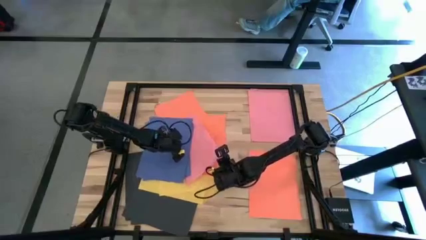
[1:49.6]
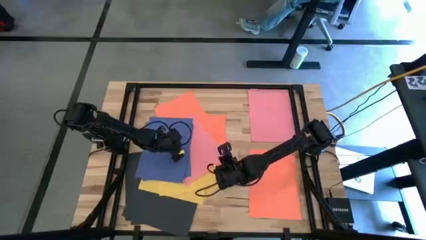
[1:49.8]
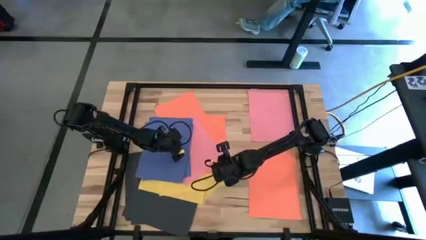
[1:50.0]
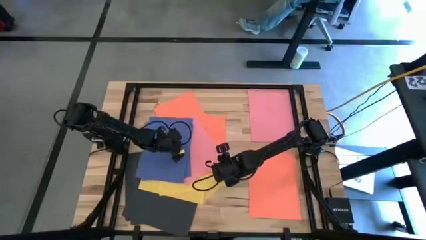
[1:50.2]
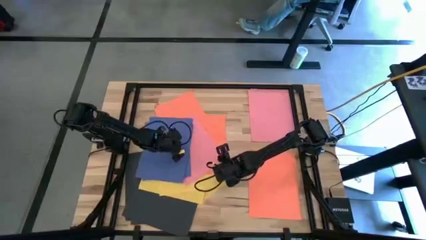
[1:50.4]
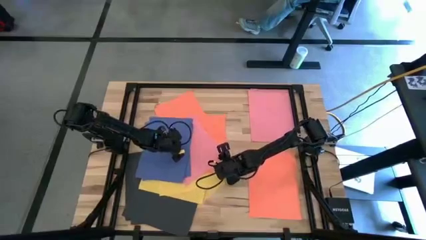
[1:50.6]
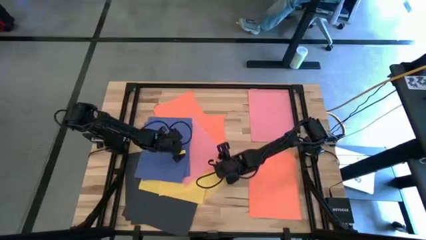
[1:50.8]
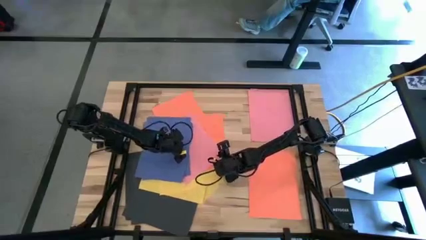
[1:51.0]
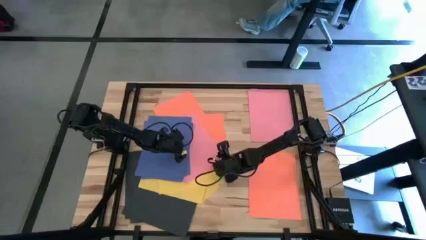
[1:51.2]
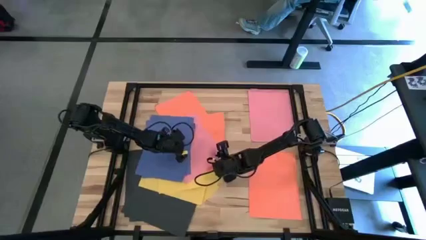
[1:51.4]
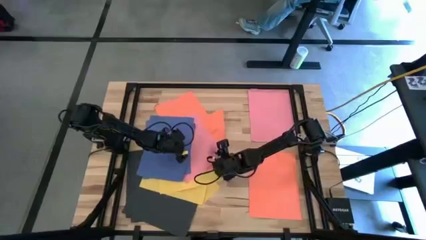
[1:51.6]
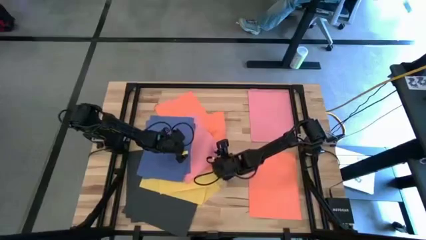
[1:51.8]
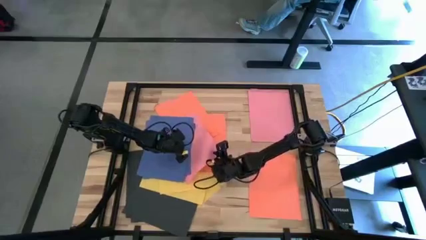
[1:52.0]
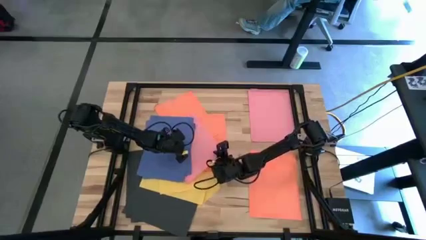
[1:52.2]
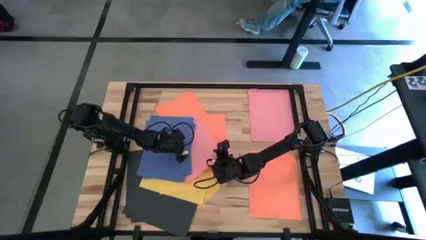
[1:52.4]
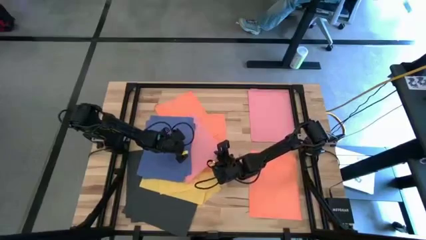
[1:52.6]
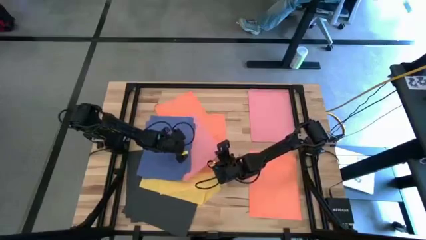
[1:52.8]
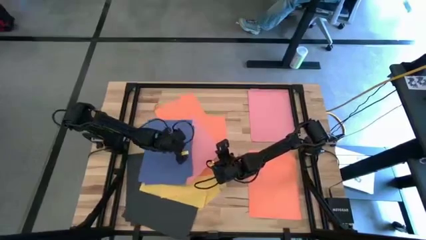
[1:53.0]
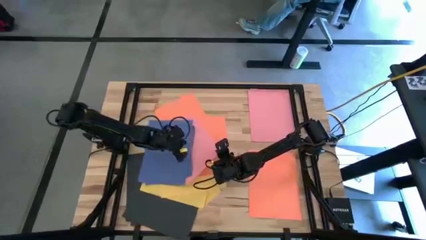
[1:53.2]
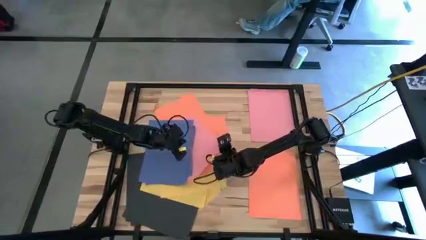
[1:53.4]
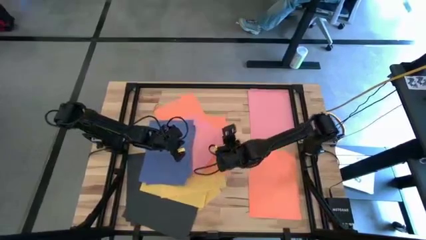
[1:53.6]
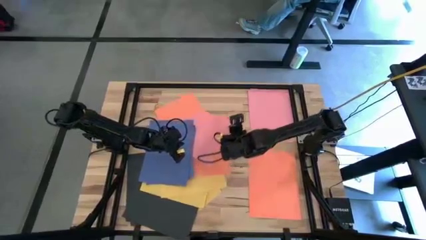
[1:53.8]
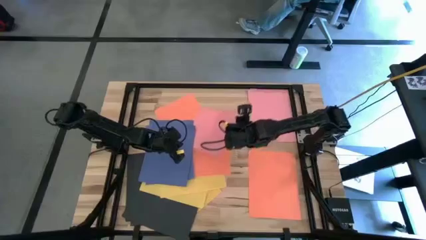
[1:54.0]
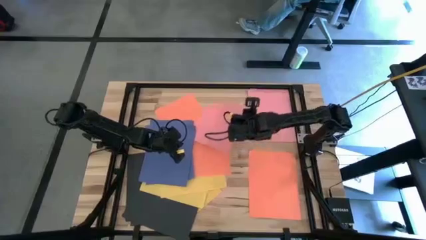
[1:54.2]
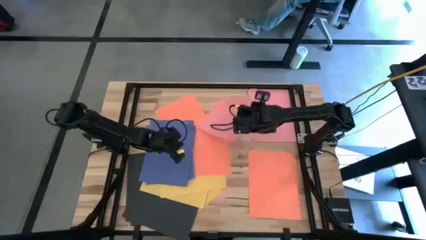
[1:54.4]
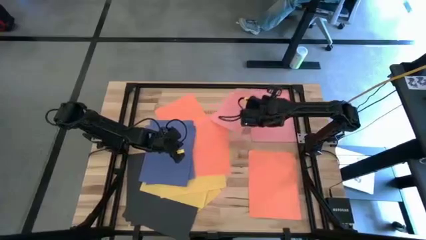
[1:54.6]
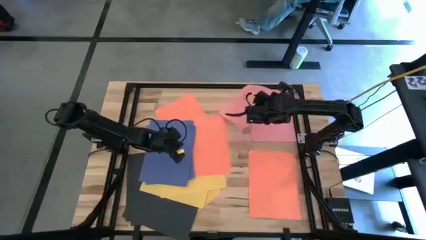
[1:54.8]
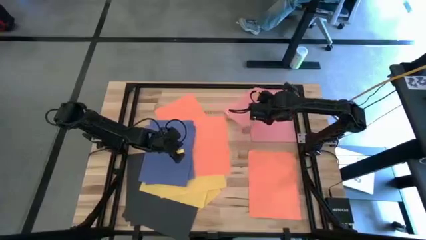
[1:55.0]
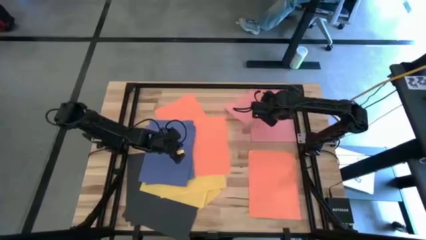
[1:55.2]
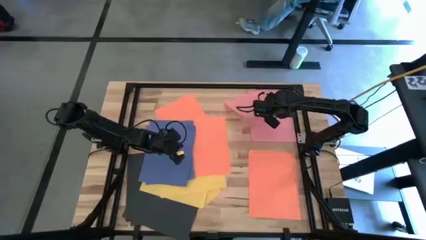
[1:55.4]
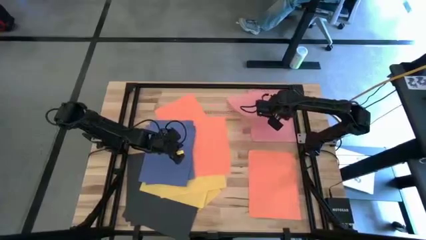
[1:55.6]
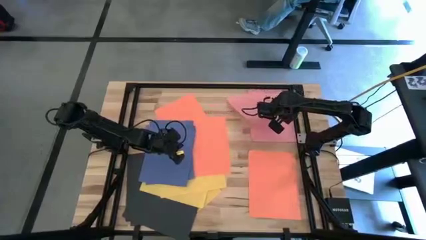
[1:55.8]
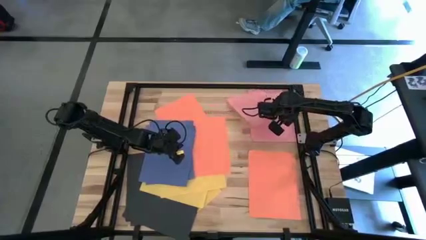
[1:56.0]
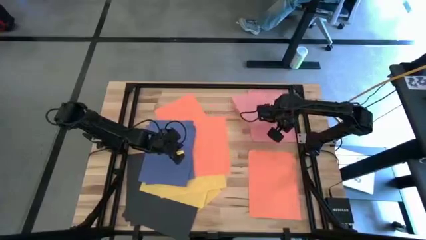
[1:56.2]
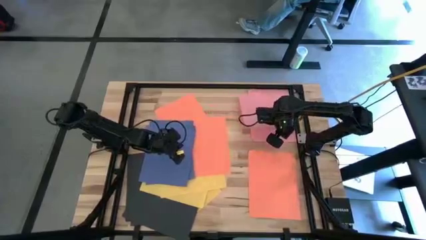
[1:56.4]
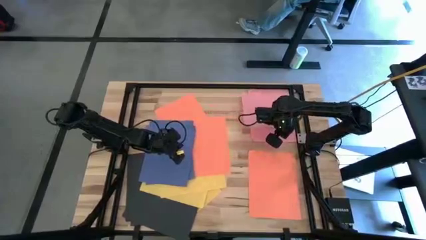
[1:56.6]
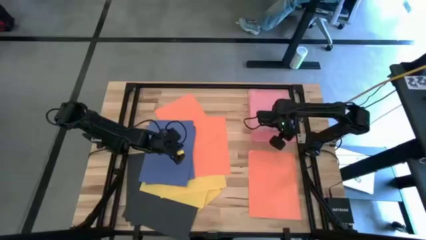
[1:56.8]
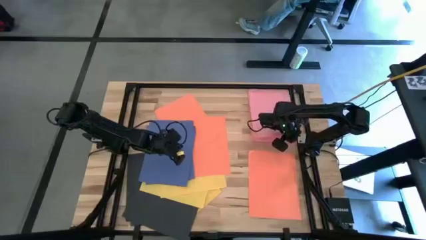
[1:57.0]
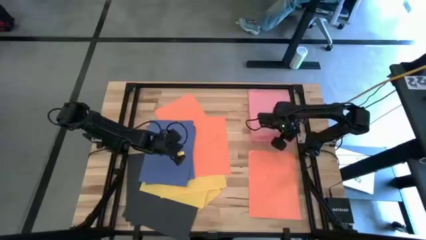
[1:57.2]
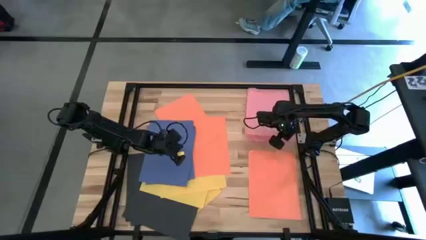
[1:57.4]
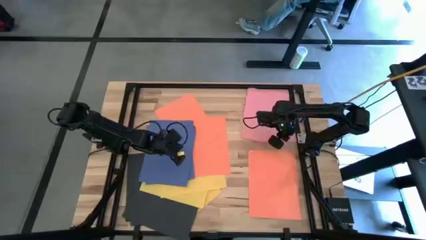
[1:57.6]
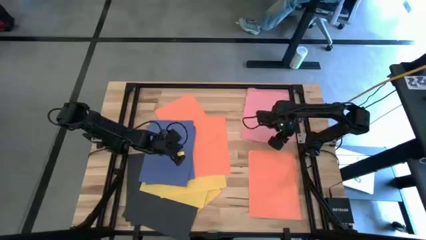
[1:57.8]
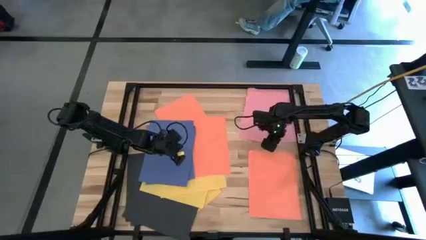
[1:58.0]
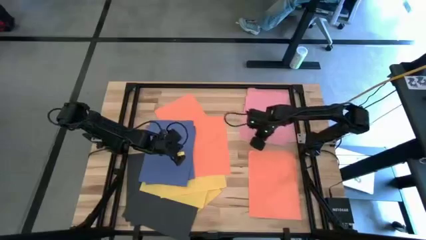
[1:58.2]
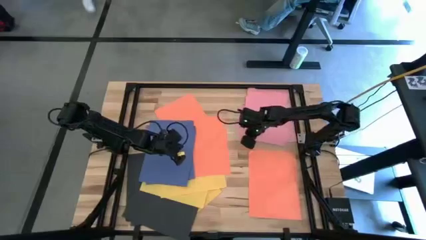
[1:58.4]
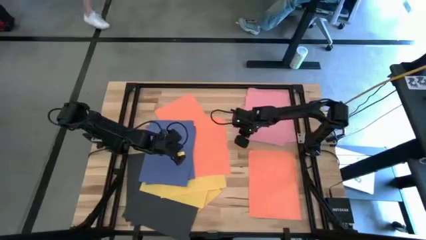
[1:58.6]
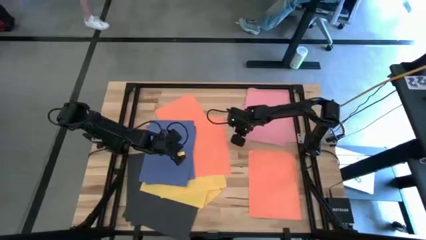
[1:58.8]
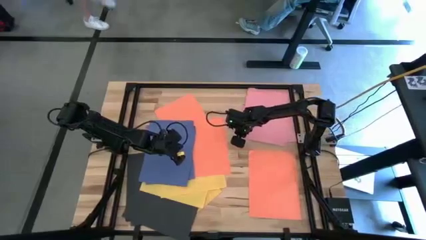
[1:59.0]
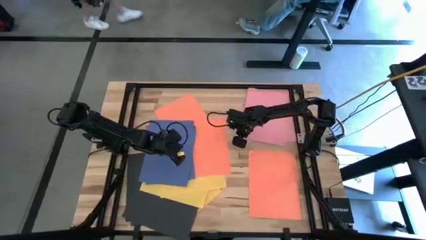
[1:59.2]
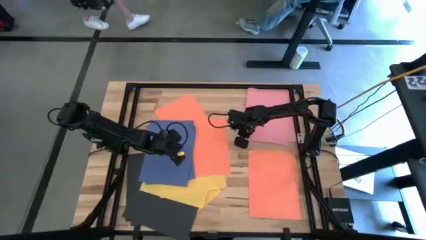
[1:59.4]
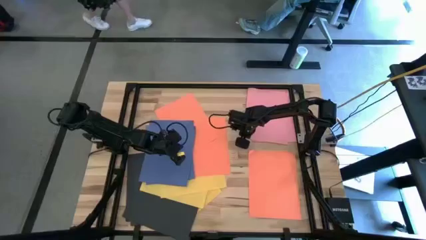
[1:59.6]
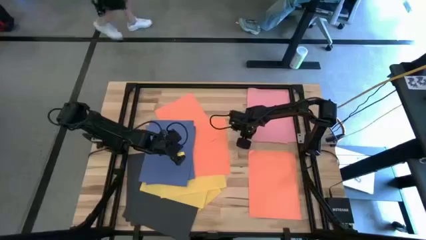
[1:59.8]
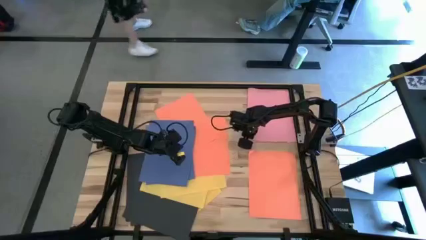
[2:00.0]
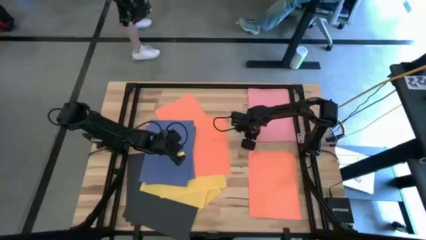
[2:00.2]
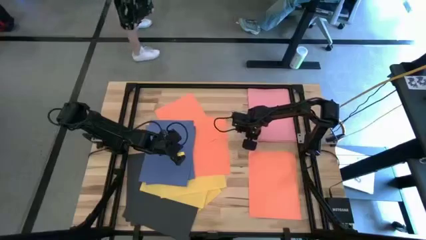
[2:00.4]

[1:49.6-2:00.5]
Task: Organize paper
Stack the pink paper on top of the pink paper

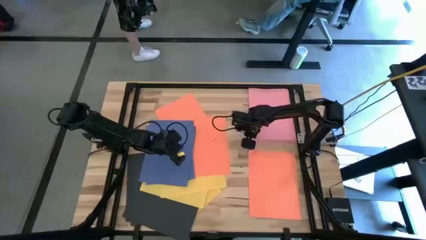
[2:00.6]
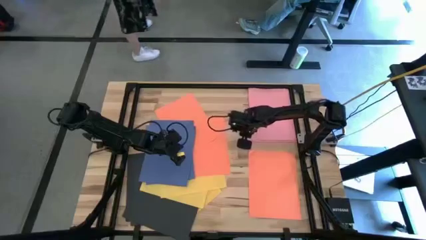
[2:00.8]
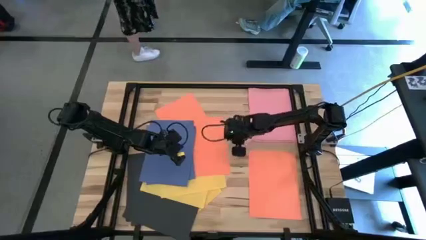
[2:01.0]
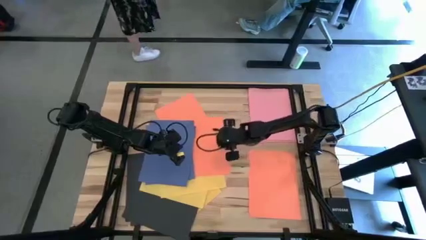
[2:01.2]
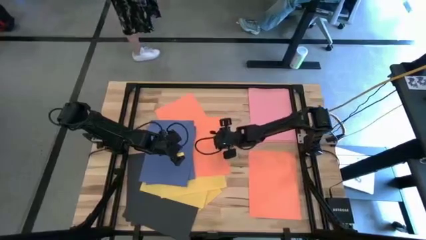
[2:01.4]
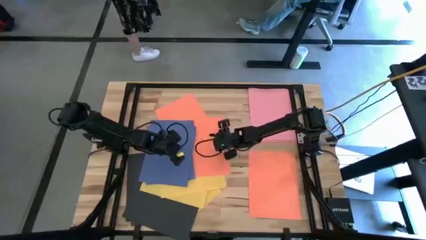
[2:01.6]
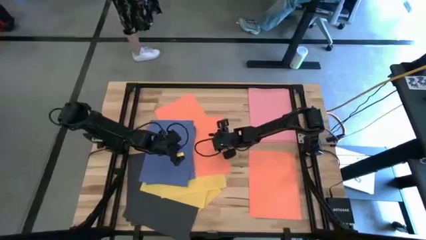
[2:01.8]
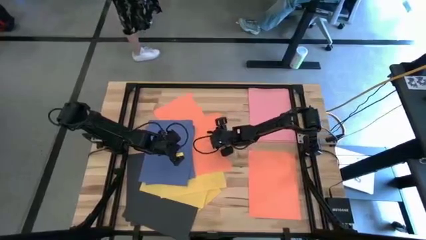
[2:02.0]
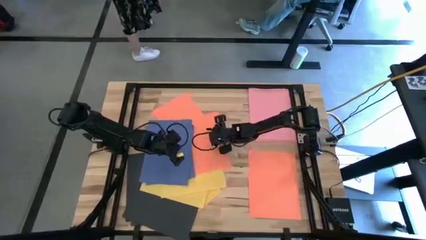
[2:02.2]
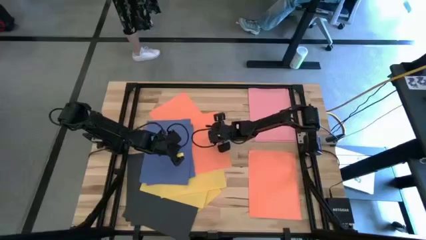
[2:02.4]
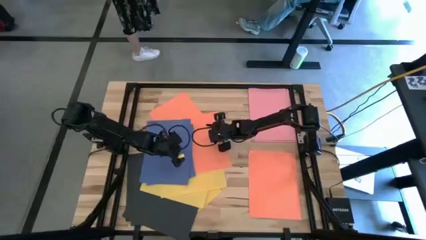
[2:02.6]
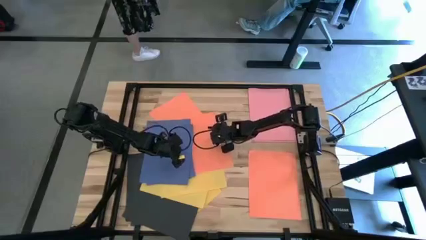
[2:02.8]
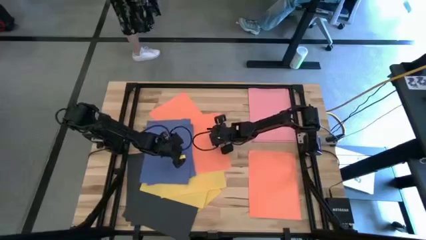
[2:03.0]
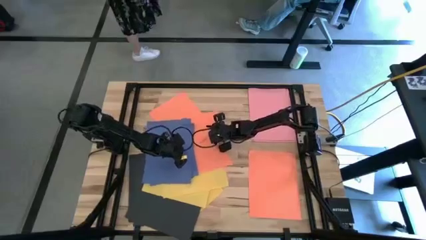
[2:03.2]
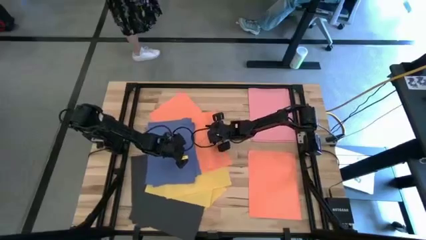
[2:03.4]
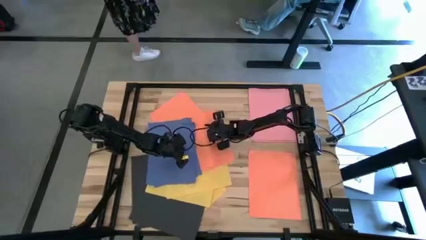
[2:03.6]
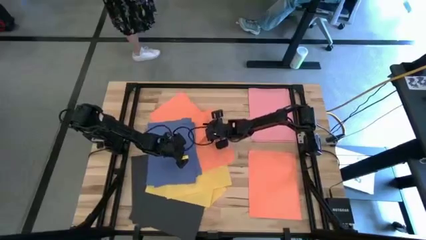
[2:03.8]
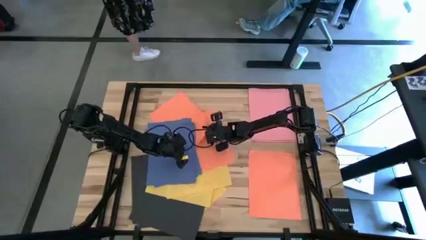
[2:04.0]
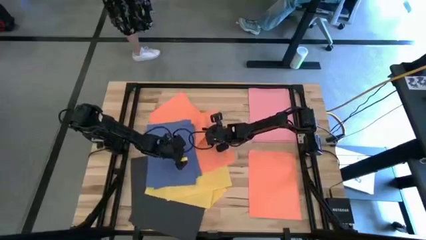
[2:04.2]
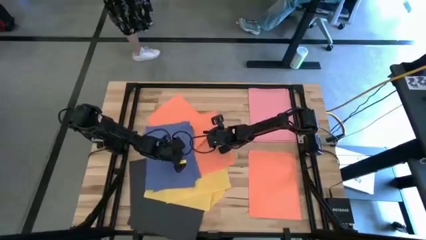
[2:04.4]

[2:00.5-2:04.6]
Stack the orange paper on top of the orange paper

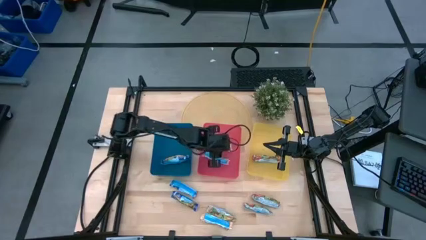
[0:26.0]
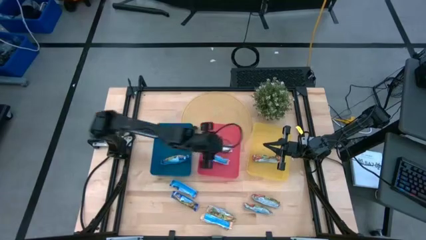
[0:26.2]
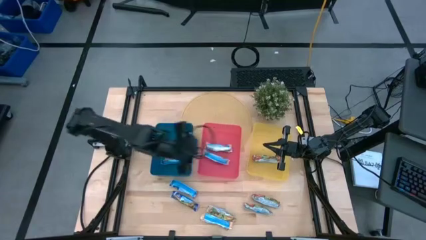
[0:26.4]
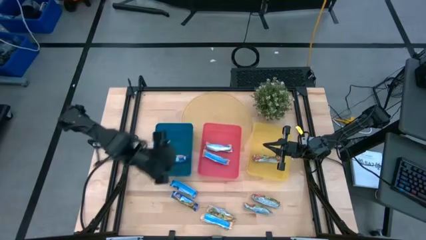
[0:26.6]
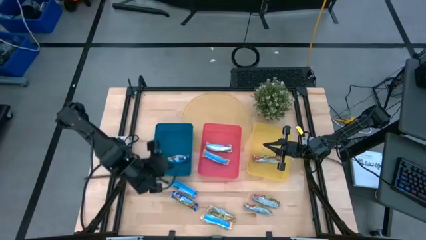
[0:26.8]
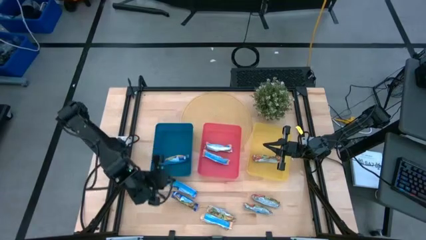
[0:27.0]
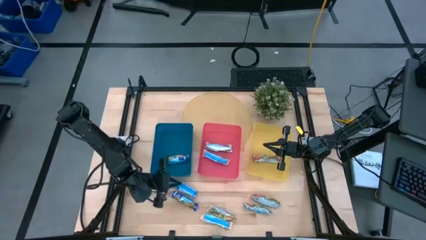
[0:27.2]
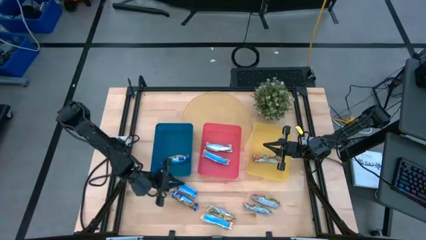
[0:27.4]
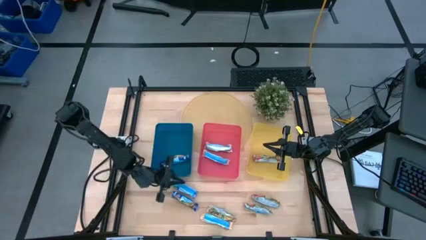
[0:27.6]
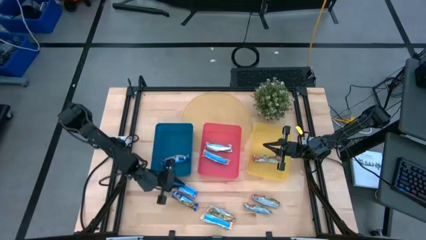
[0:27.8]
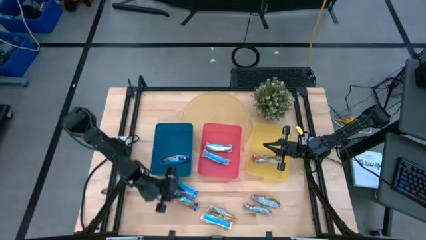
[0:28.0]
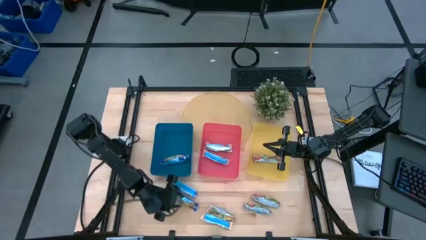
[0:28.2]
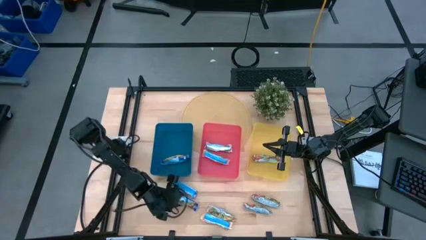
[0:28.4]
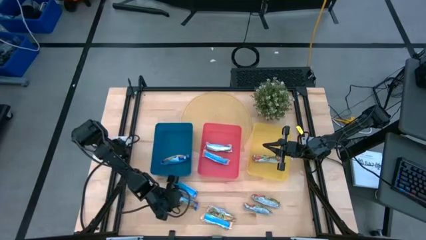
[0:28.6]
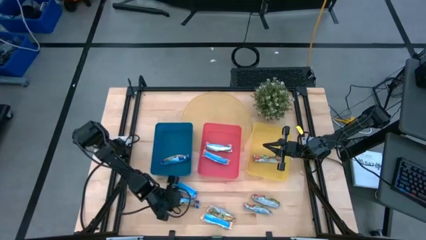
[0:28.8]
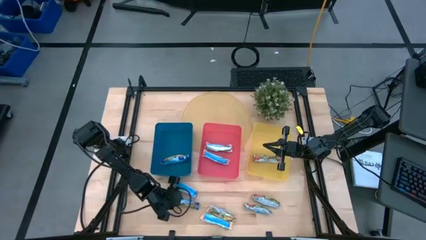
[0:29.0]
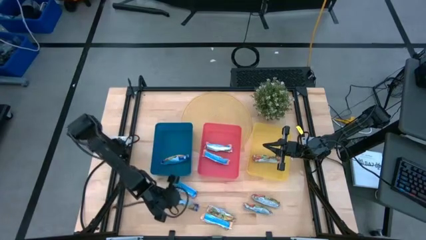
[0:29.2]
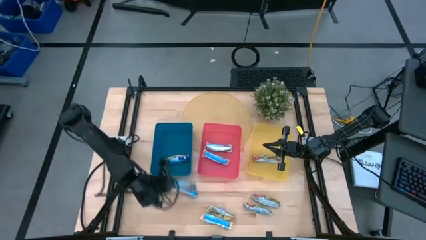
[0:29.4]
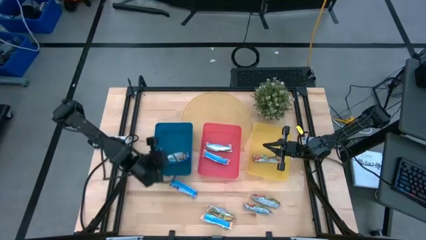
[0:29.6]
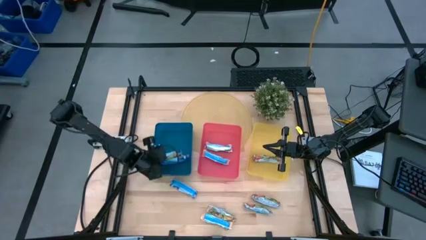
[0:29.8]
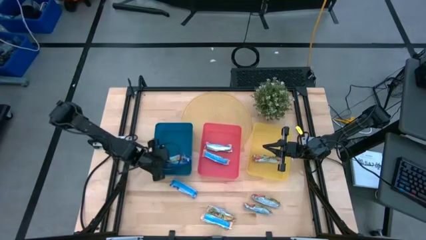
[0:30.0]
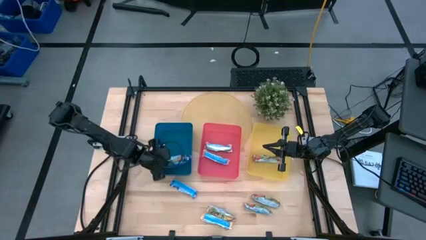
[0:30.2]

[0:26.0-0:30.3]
Task: Pick and place Granola Bars by type
Put the blue granola bar into the blue bin
